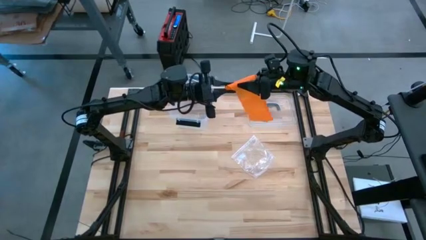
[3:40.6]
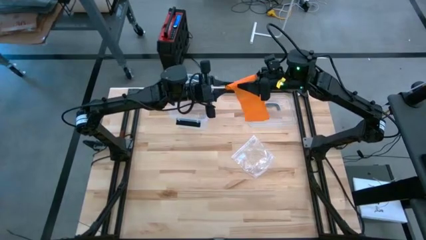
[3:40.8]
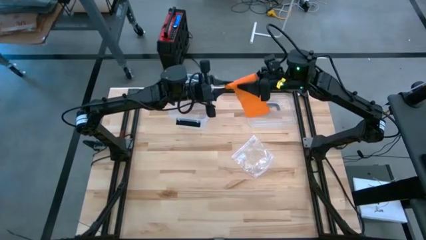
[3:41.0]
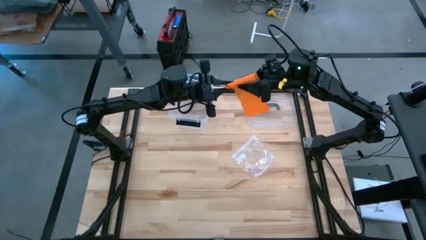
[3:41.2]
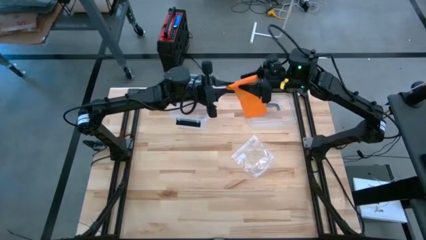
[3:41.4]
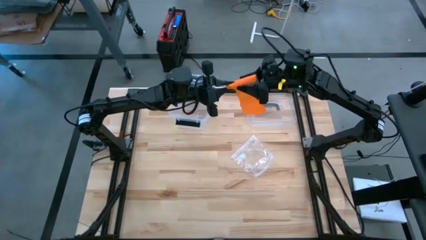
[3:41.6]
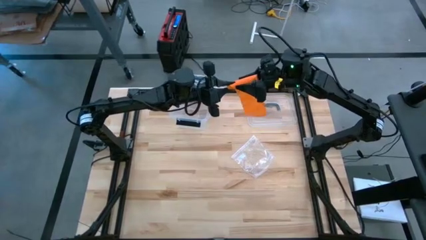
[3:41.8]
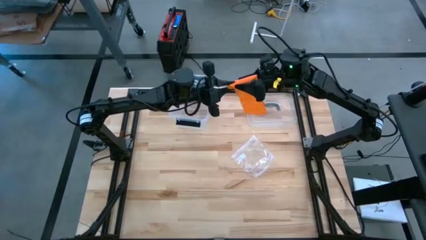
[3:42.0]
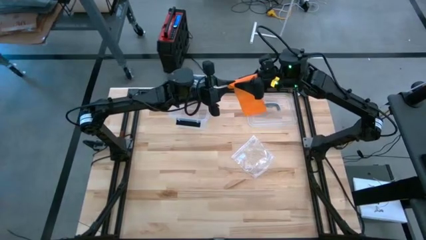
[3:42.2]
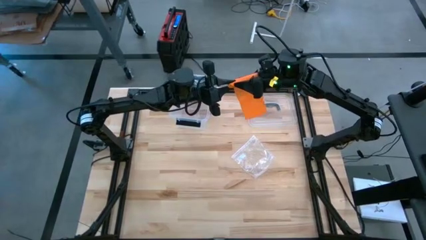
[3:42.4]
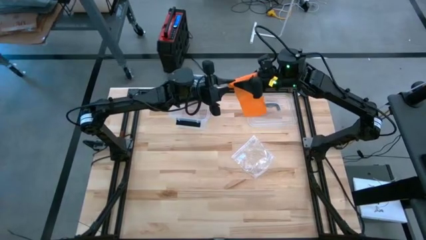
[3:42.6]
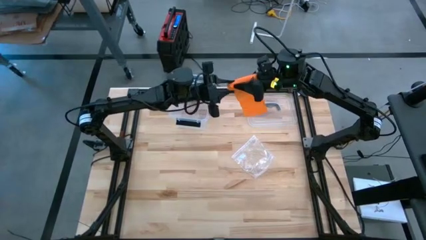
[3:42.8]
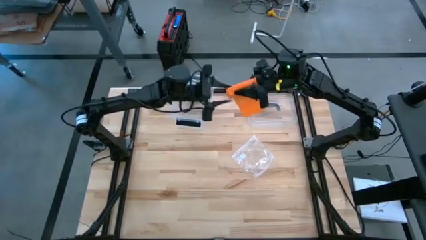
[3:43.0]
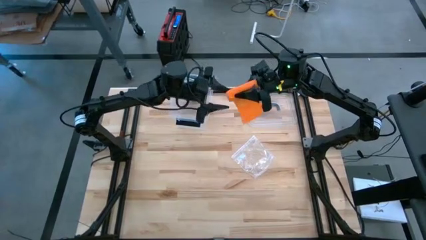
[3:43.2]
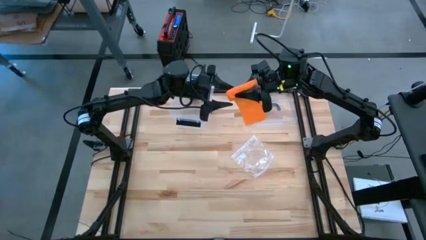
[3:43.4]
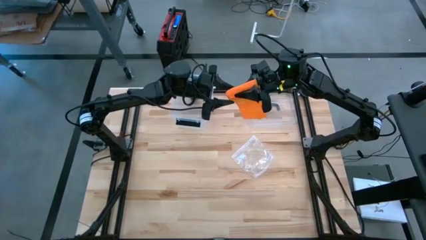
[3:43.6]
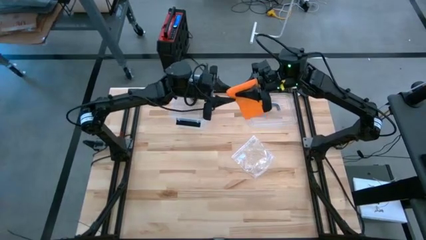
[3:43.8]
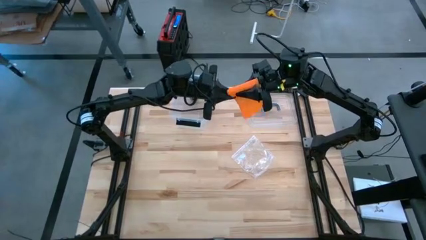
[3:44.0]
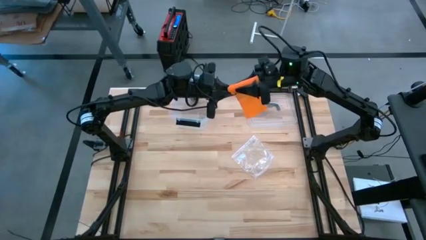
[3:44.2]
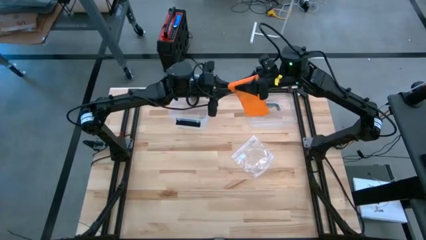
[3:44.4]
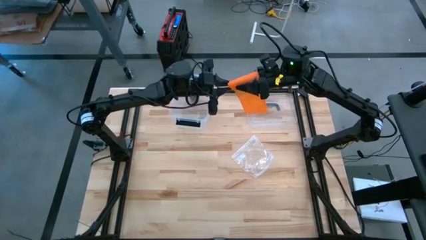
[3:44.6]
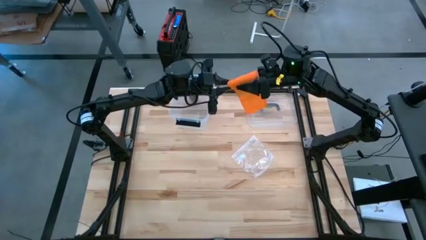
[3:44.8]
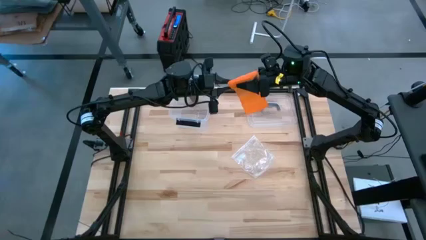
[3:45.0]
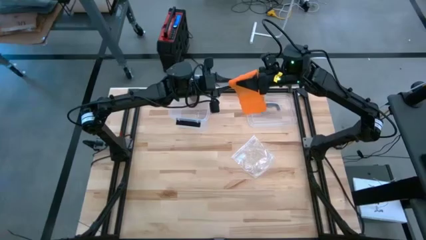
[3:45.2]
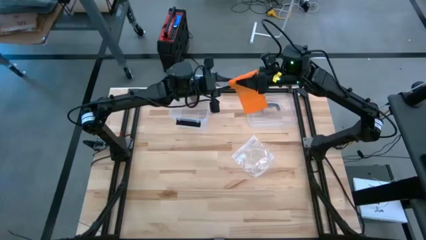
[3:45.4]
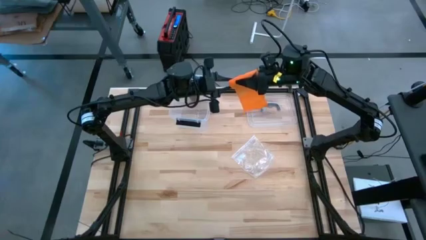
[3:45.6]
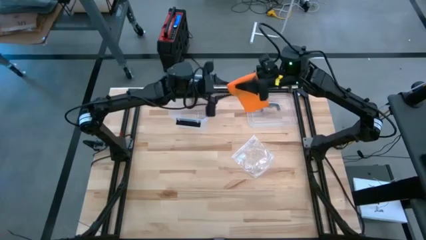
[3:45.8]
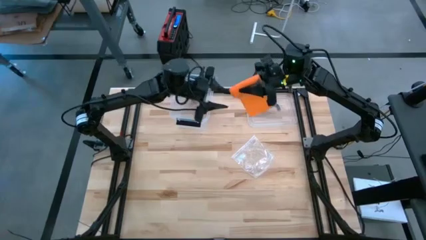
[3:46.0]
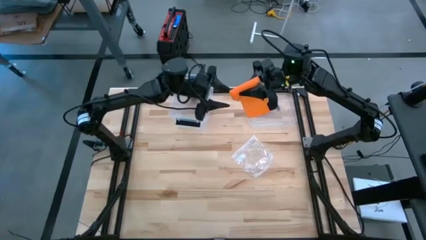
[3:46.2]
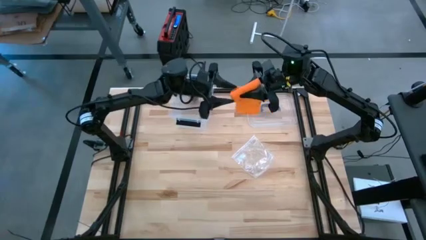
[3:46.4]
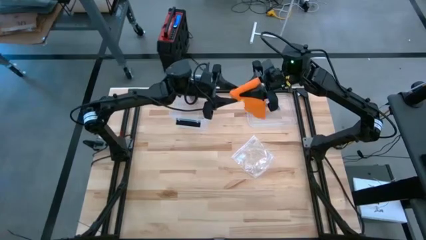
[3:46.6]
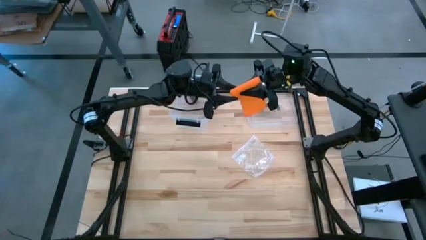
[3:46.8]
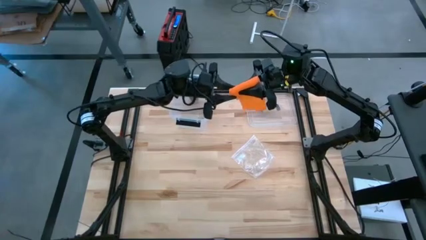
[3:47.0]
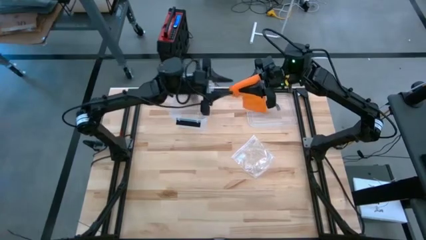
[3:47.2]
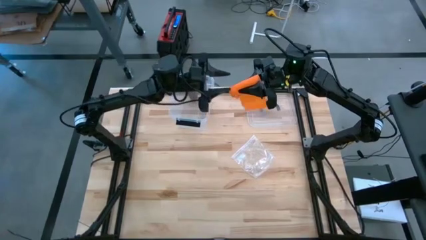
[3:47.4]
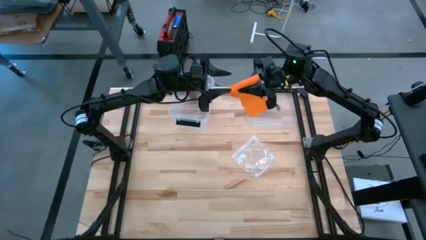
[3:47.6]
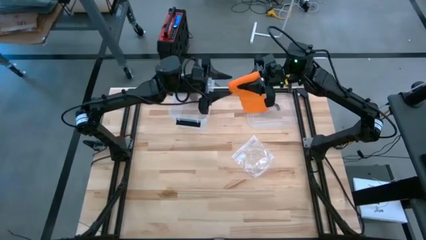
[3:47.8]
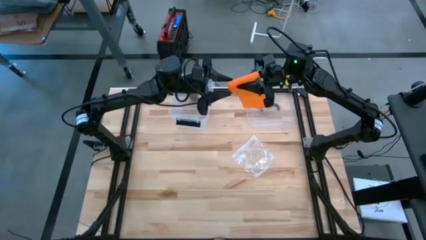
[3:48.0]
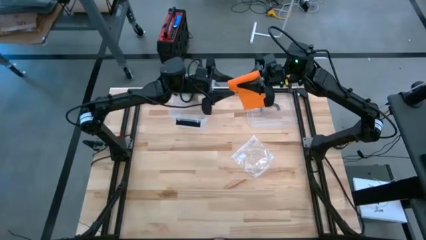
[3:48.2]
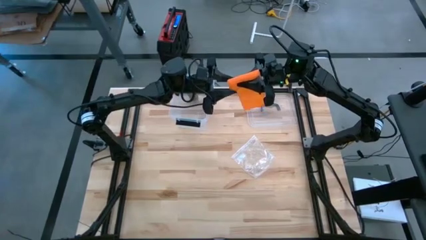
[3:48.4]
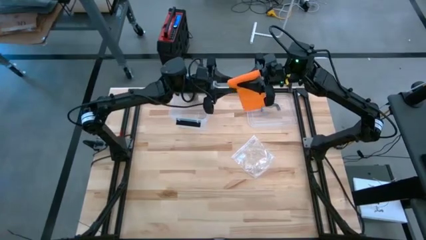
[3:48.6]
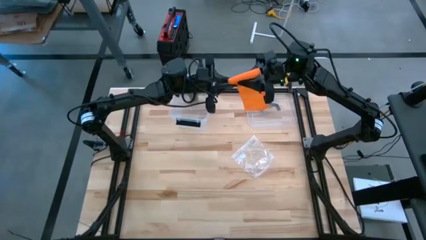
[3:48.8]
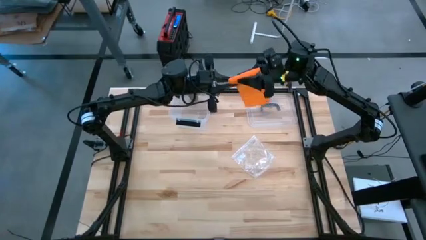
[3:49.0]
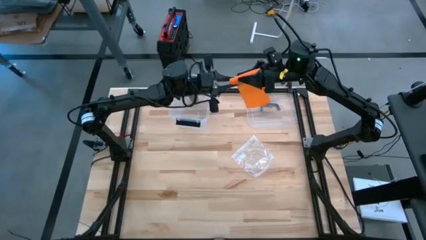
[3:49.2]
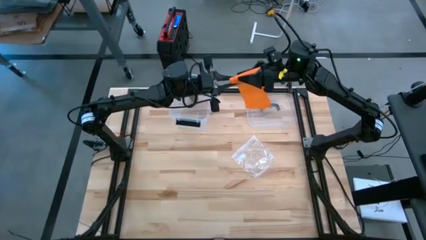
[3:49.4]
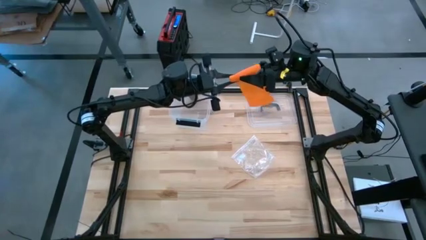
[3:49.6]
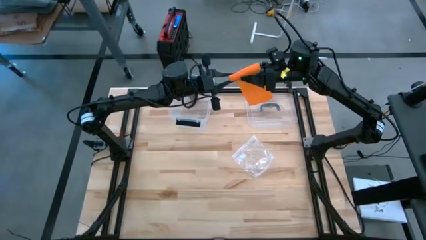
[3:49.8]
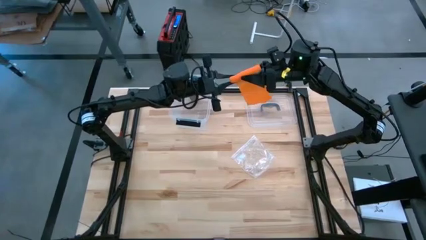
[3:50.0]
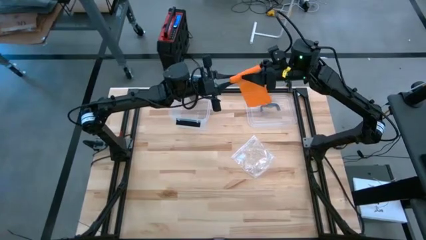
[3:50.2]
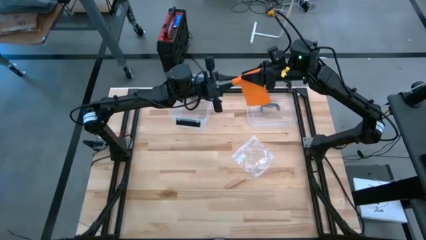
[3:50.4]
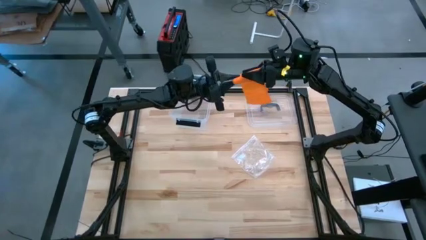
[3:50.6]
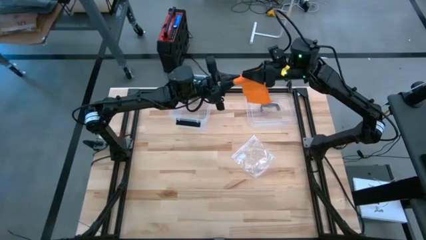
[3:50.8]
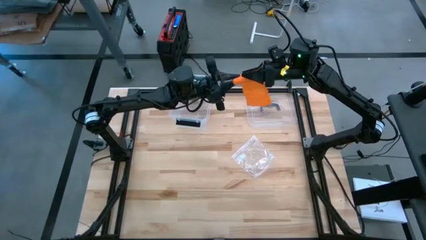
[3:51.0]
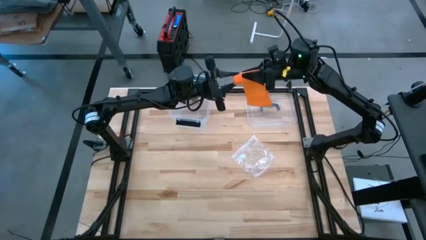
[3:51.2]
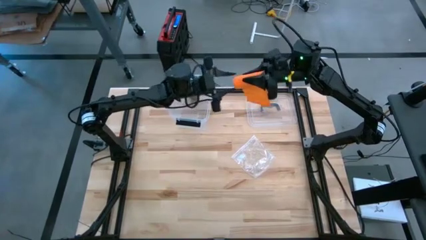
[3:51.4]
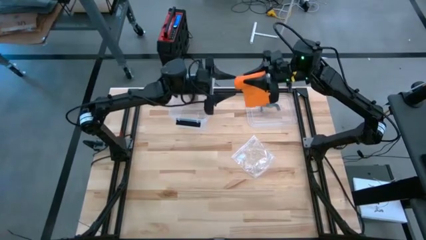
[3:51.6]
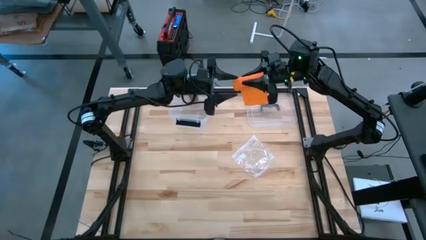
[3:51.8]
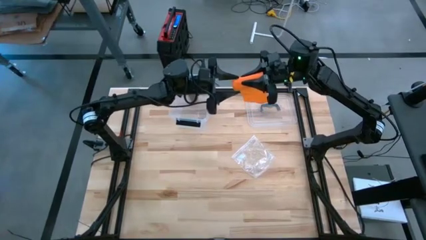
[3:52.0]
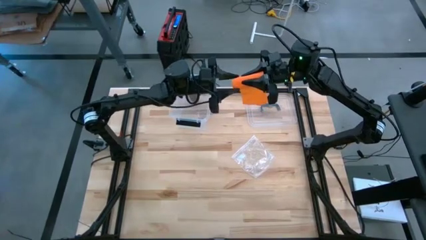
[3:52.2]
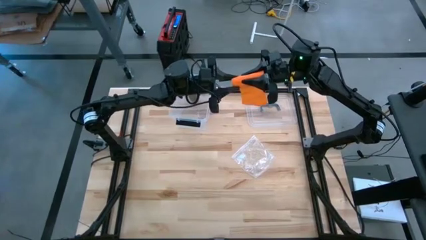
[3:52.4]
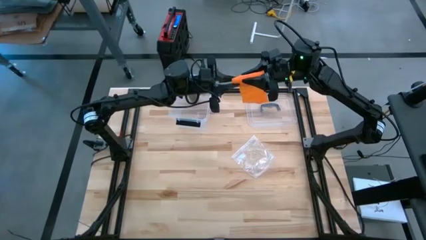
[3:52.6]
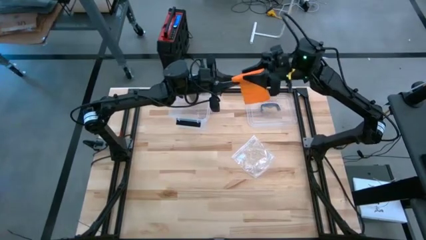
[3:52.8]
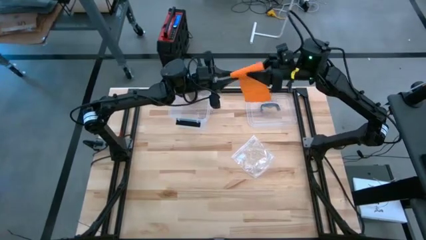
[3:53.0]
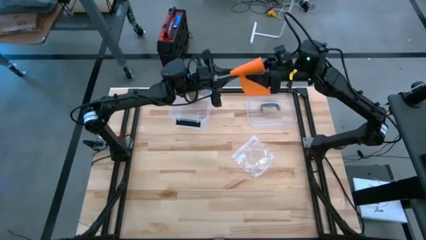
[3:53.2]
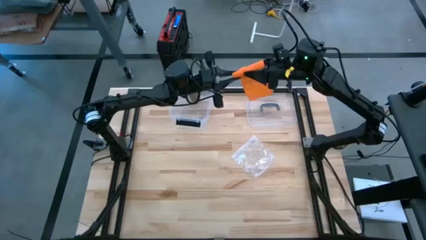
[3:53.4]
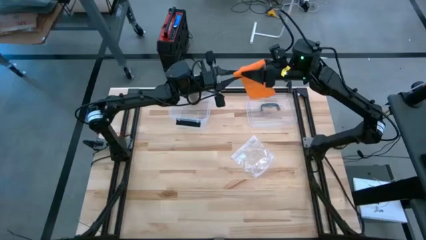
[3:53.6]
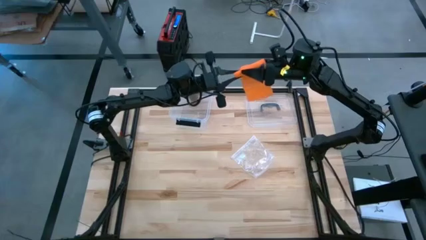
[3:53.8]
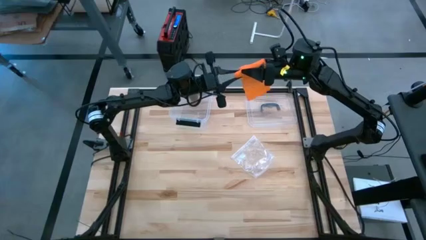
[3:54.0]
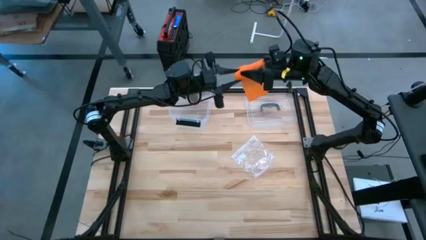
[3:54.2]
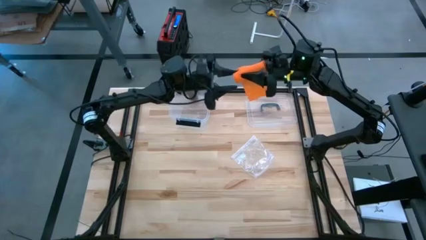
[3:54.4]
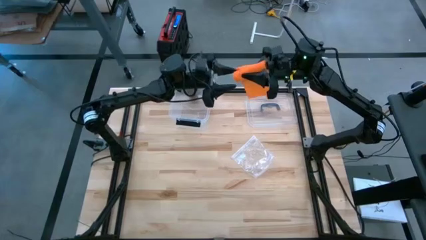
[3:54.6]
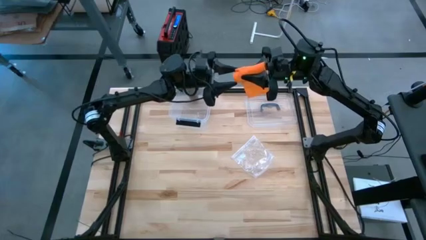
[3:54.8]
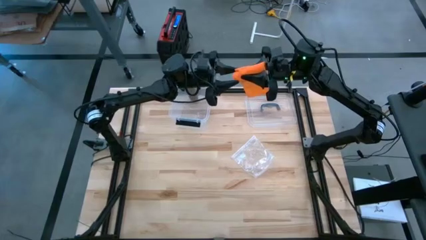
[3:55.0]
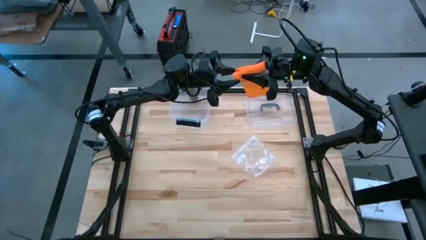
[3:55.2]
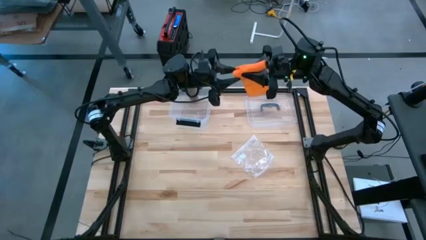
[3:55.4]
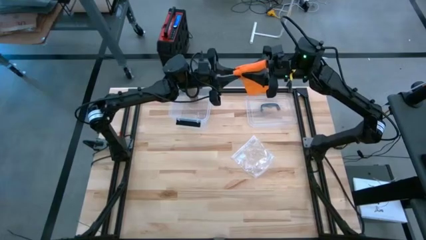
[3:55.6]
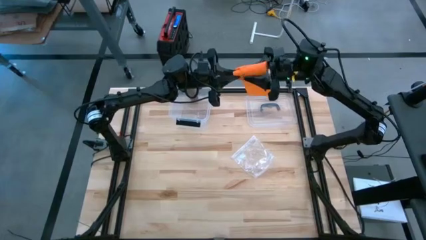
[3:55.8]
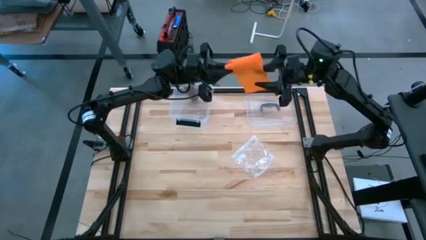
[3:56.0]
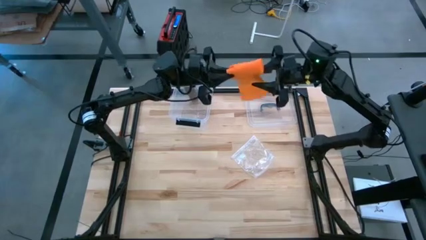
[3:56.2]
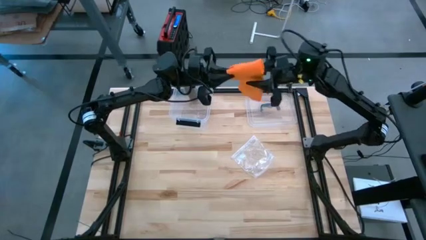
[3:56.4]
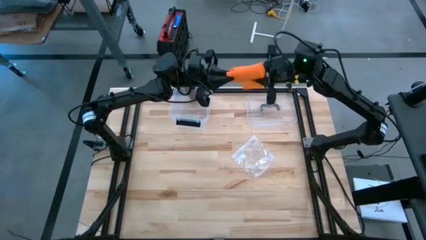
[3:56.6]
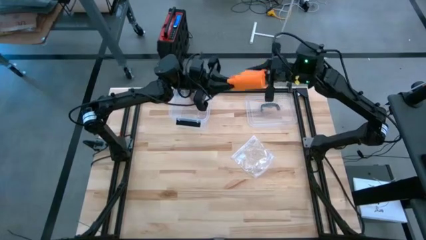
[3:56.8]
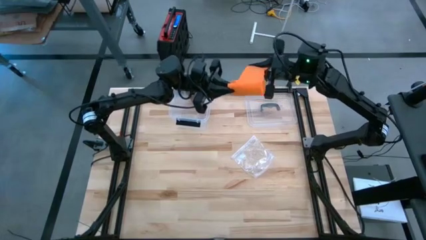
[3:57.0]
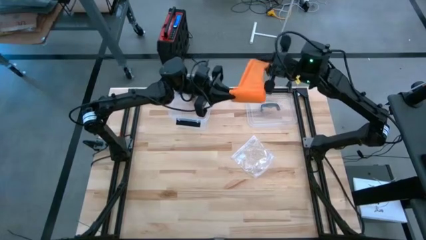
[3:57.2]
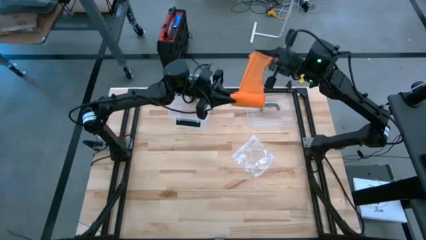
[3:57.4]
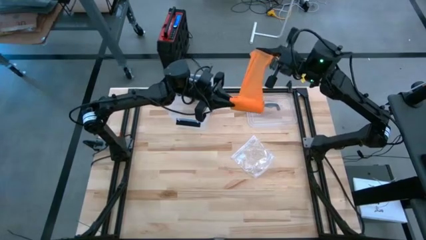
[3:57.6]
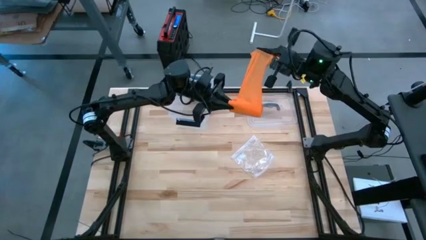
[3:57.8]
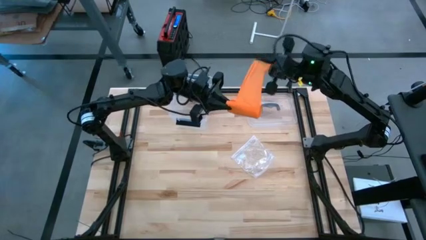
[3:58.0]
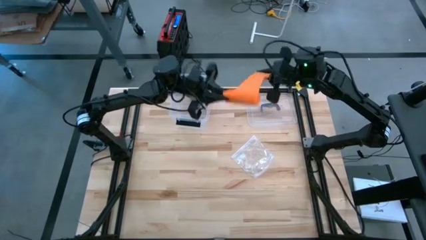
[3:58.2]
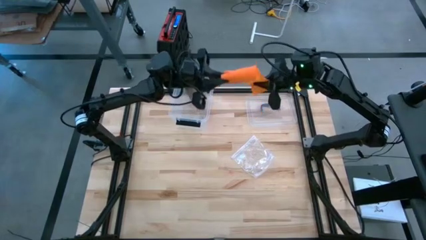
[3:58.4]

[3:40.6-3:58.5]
Task: Roll bandage
Roll the orange bandage
